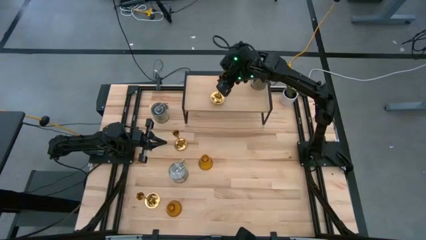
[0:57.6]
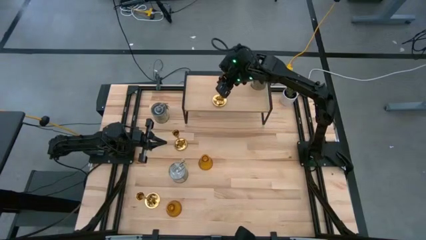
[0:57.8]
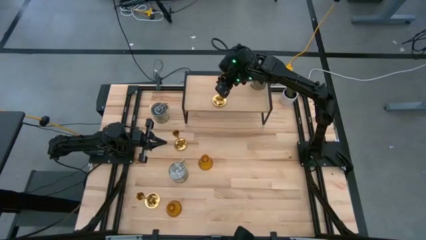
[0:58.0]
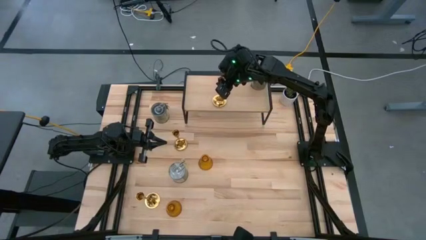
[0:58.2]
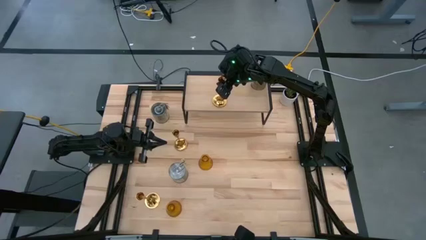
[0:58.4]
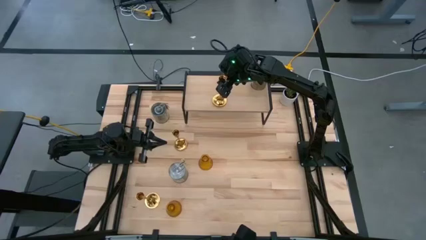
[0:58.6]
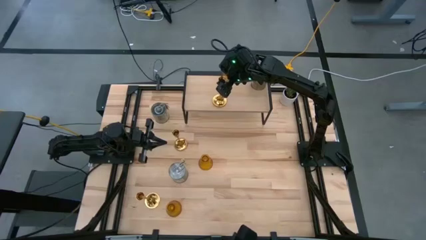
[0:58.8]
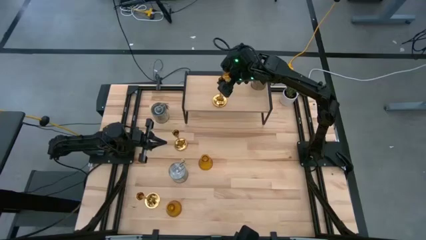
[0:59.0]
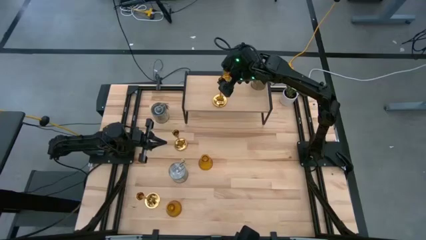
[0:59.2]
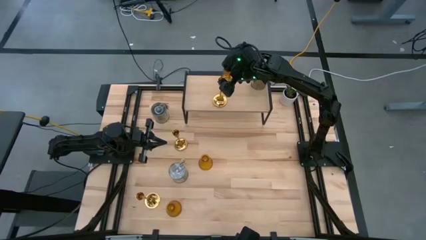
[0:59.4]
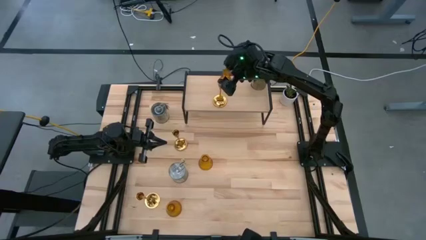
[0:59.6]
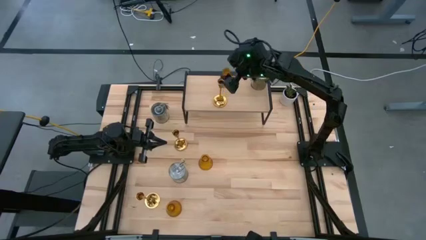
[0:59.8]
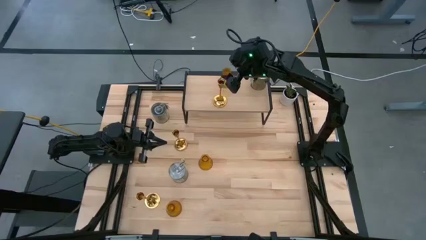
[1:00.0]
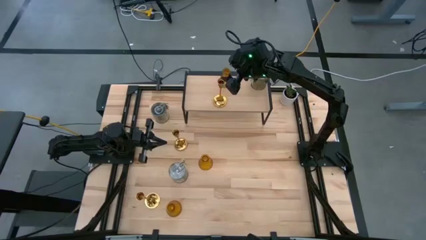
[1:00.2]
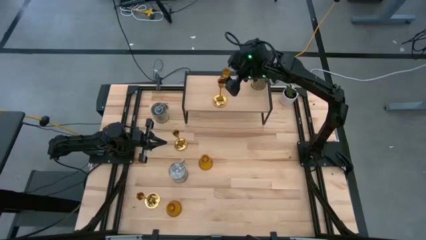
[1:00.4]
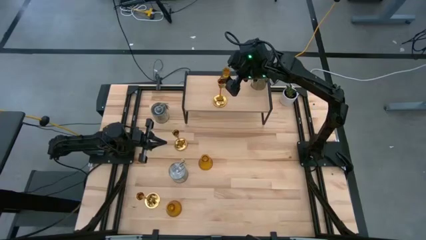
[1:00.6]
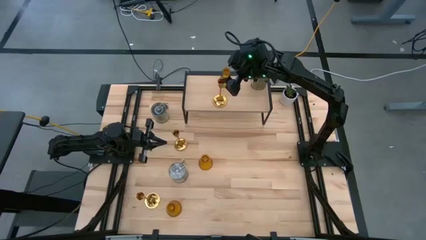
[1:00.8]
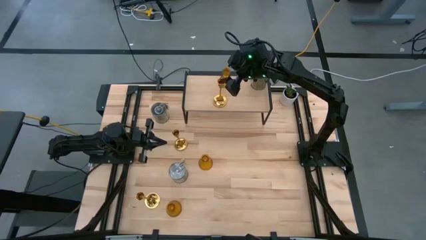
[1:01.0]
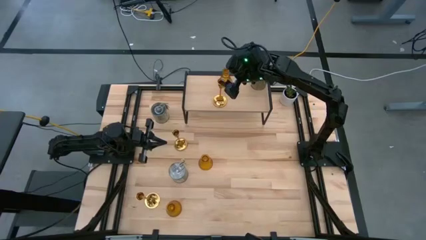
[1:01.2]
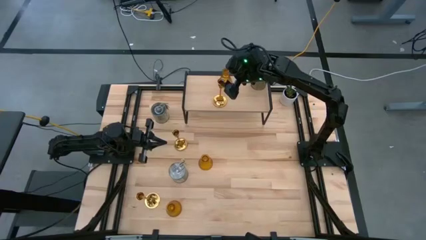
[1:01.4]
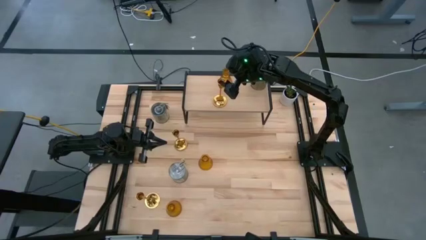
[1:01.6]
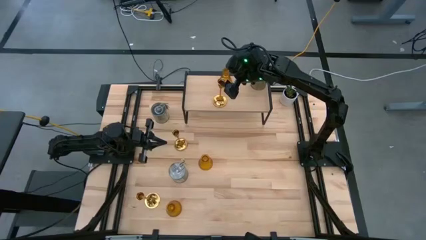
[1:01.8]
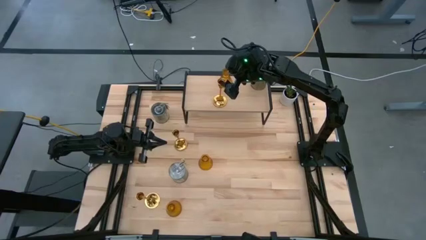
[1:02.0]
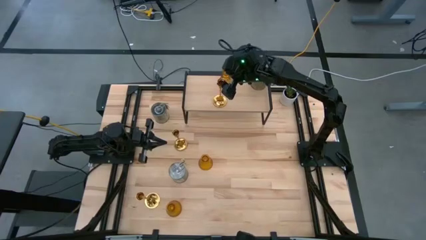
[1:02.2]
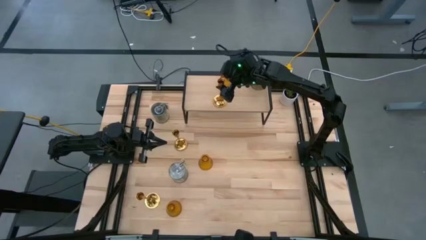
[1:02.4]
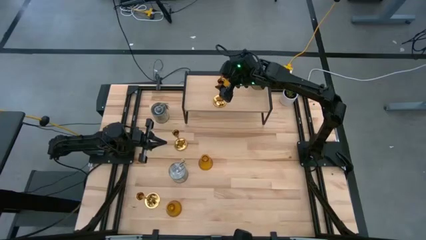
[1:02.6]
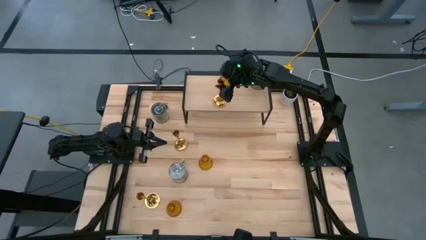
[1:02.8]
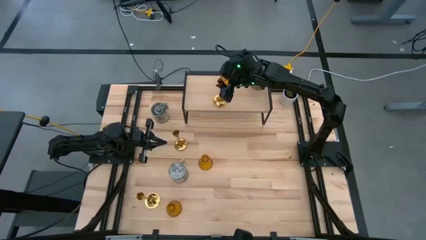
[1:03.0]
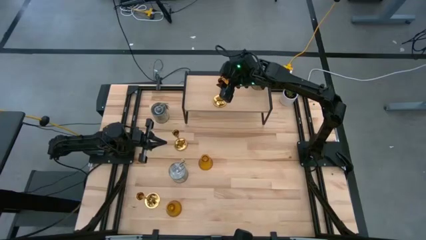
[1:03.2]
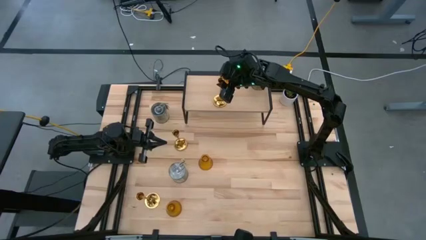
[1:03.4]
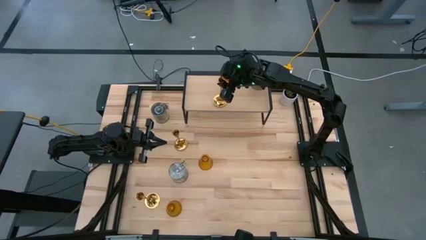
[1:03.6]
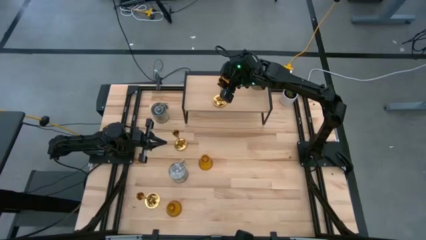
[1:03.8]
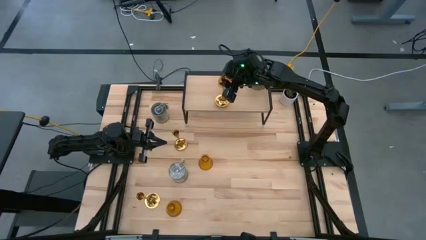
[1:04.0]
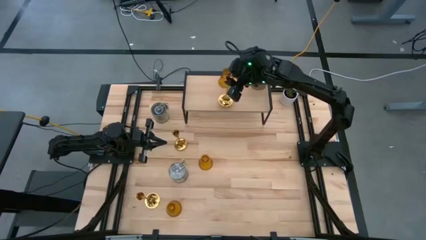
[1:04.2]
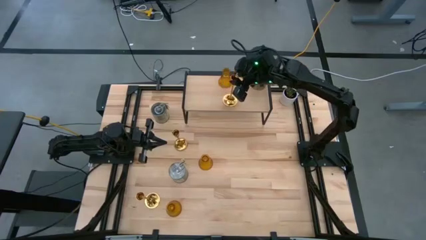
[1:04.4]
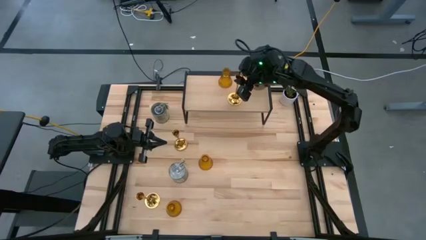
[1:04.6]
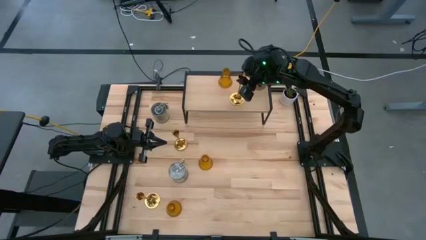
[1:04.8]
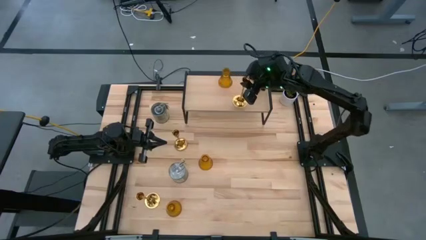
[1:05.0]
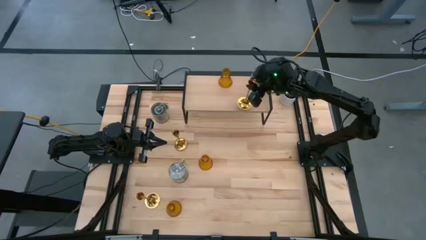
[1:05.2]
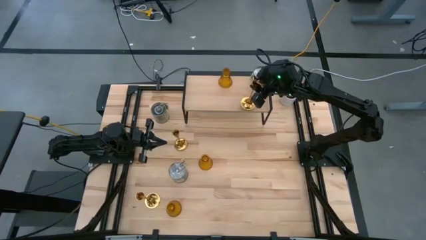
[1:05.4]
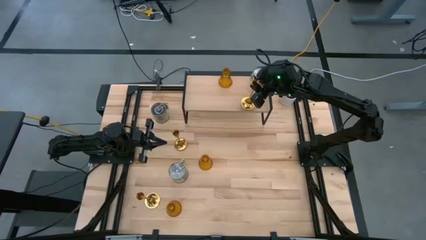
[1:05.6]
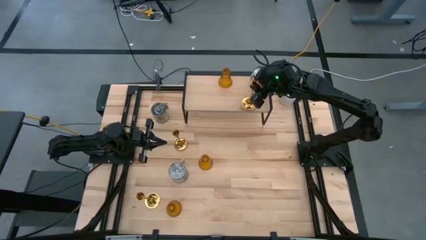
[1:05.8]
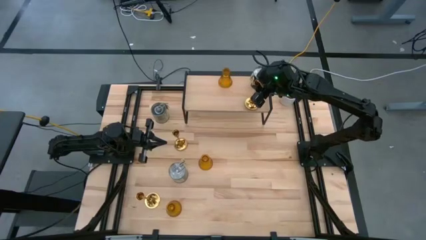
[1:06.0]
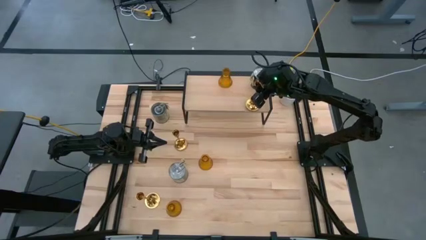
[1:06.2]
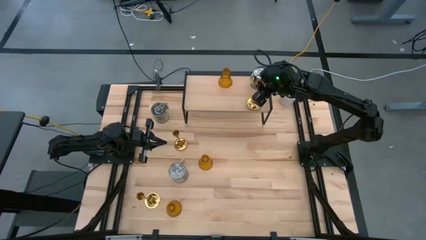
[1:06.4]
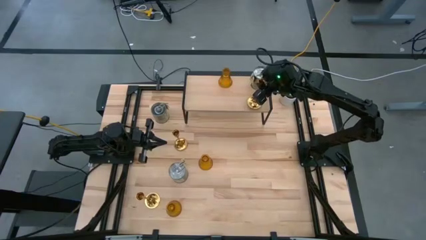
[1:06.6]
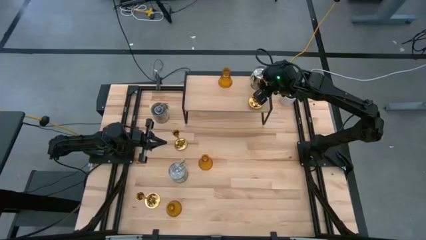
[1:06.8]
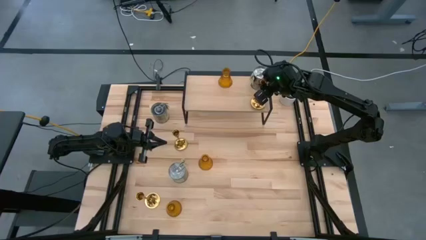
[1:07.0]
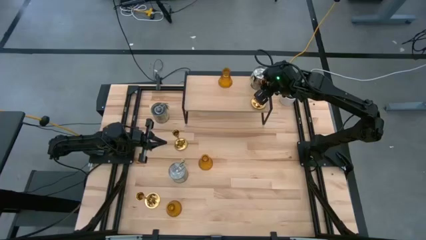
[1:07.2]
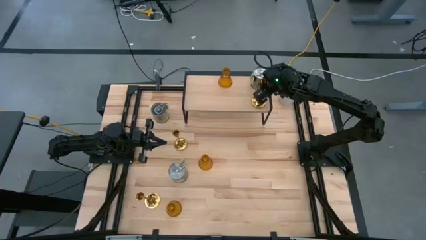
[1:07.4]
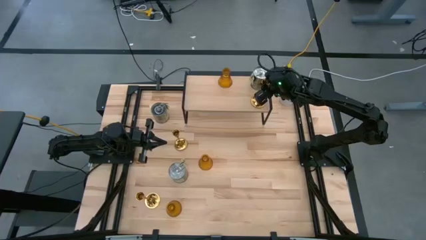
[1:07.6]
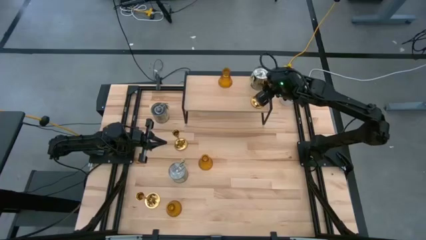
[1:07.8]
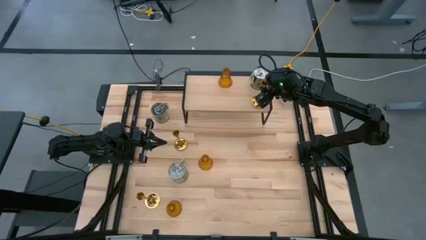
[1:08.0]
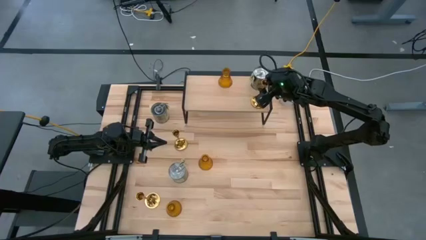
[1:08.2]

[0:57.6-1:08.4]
Task: Pick & Place candle stick holders
Put the middle gold candle holder on the shelf

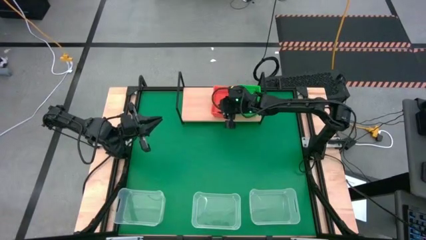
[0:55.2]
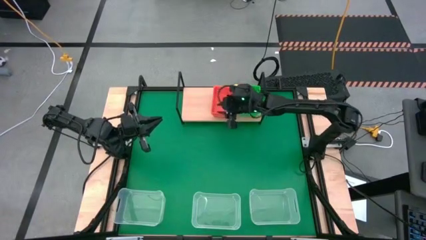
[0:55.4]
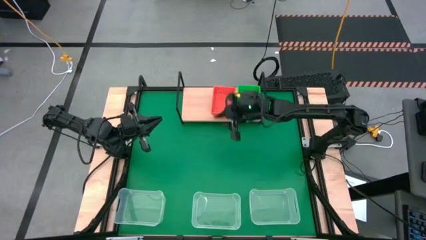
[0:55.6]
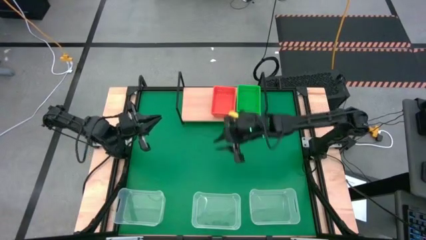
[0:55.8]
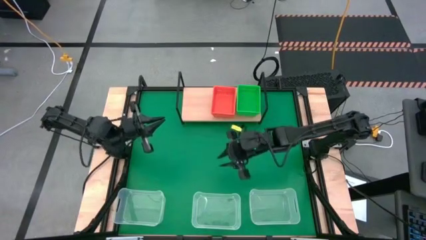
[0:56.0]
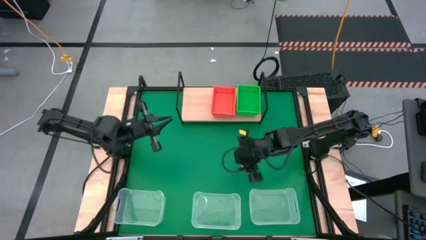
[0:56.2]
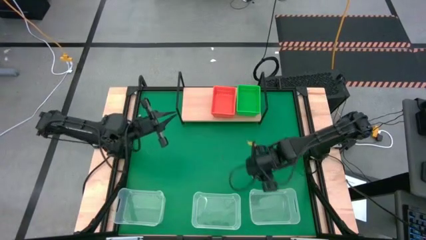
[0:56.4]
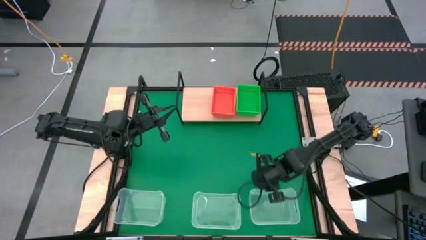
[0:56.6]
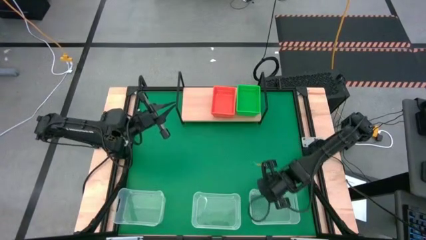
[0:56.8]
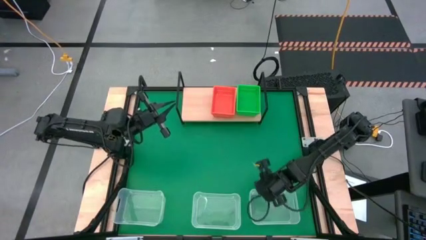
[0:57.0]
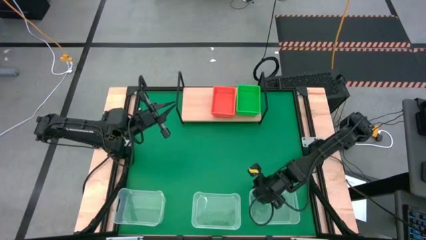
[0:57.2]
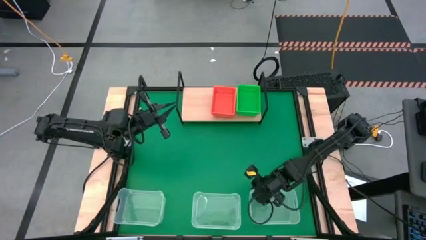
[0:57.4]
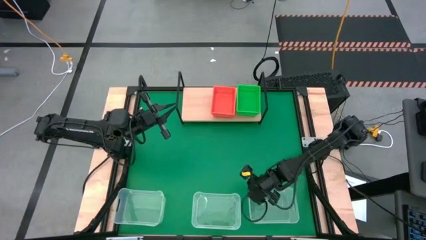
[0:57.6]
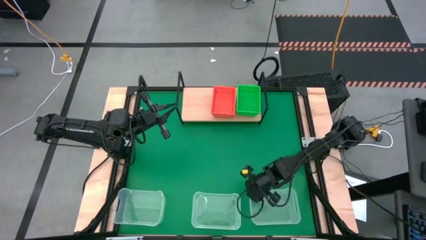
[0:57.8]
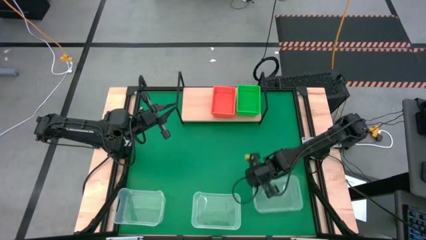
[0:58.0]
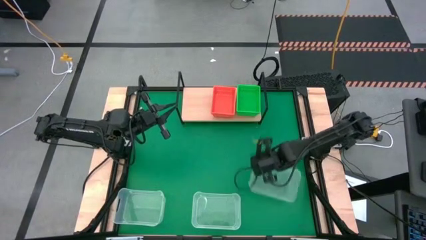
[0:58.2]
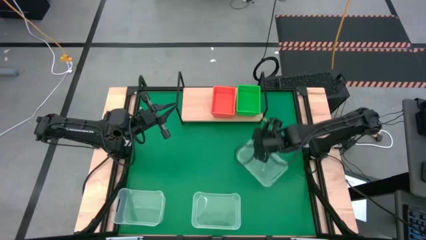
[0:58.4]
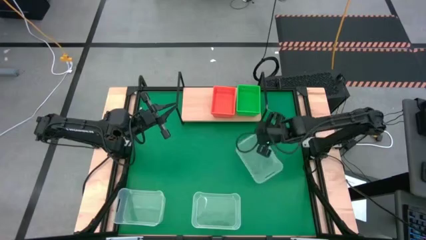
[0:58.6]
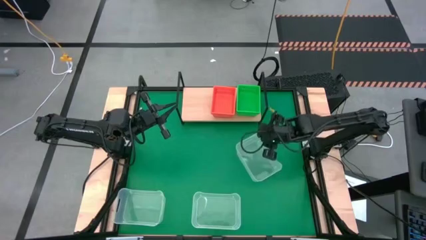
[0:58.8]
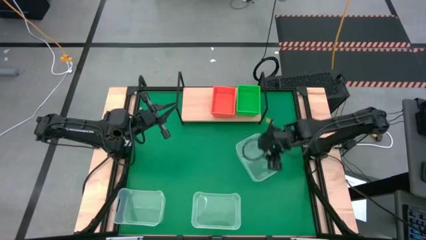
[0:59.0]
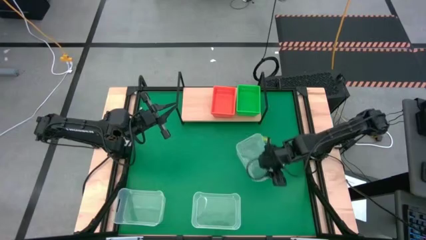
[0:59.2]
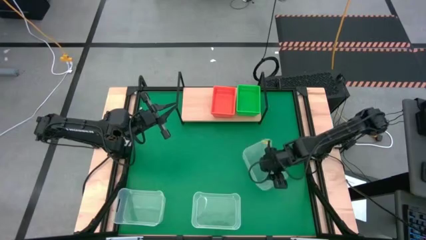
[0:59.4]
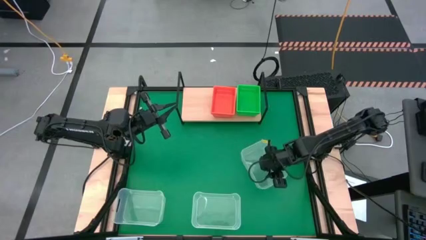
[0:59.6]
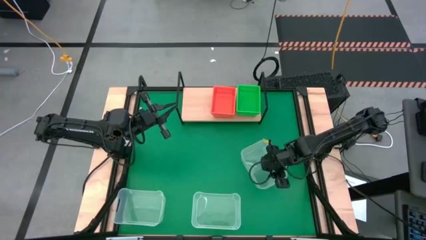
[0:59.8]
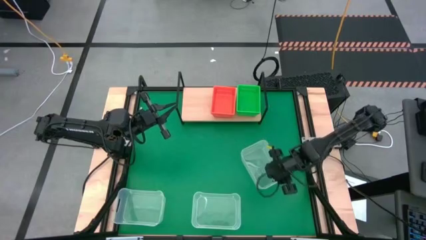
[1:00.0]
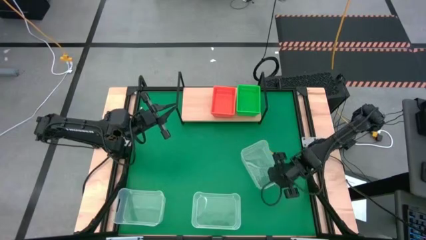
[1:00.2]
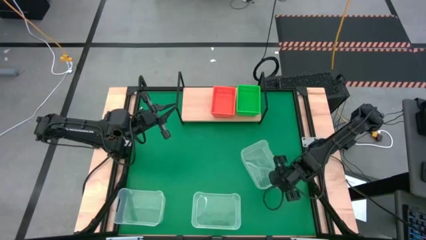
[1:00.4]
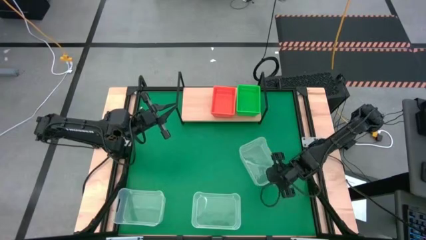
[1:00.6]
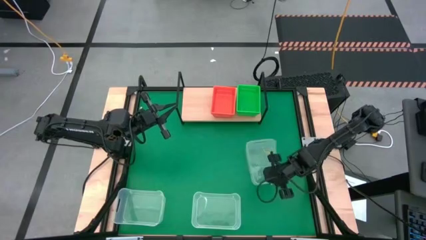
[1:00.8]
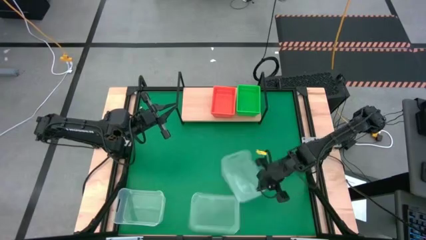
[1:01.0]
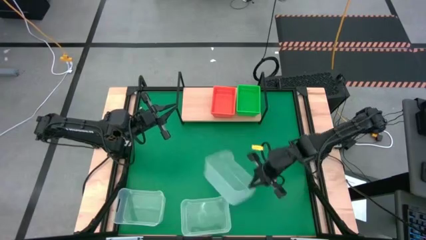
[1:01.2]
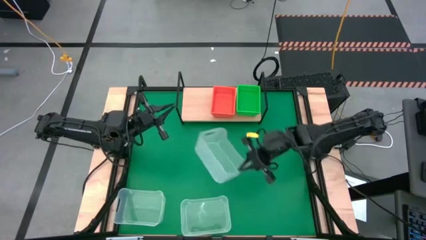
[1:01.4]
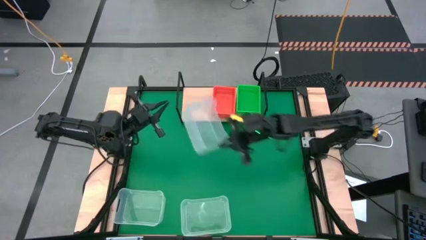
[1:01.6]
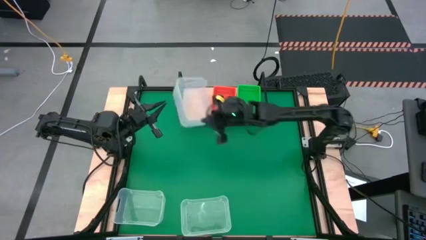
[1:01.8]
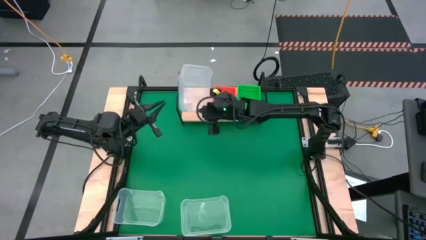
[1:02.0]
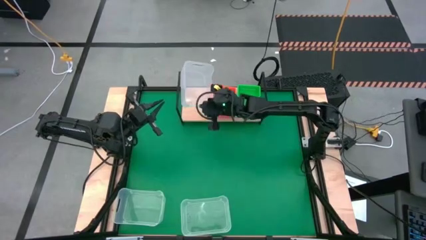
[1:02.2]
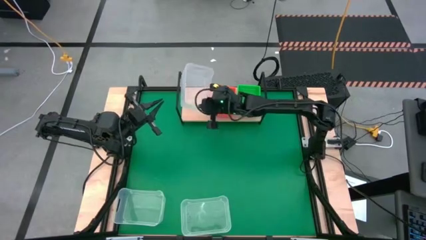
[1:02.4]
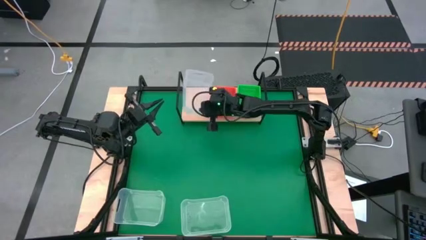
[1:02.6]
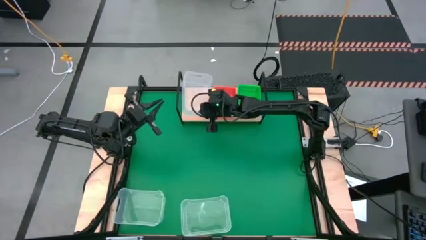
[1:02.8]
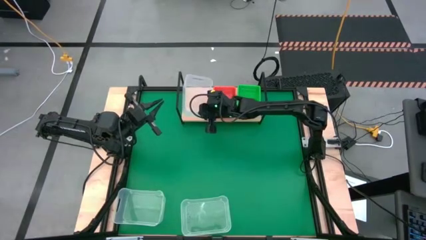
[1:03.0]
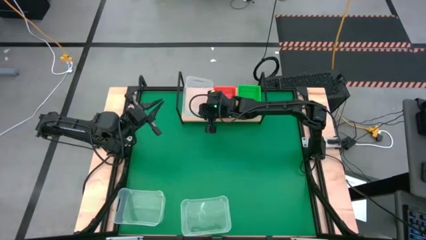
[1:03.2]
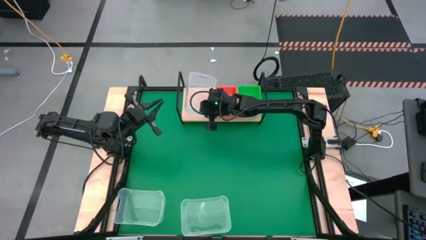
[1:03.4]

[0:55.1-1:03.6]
Task: Stack baskets on shelf by color
Put the right transparent bin on the shelf
